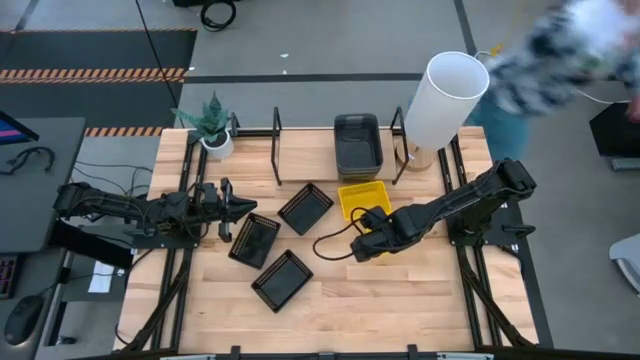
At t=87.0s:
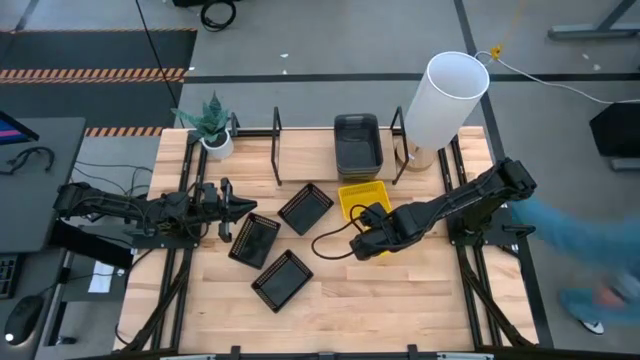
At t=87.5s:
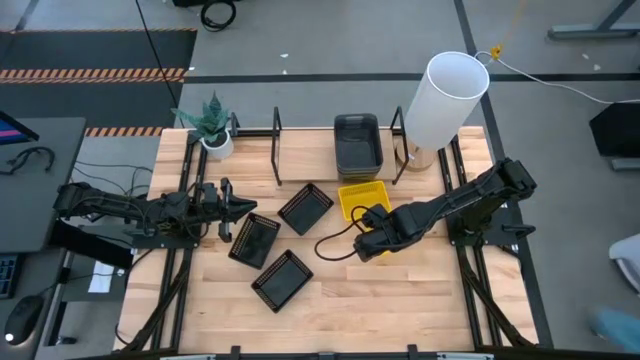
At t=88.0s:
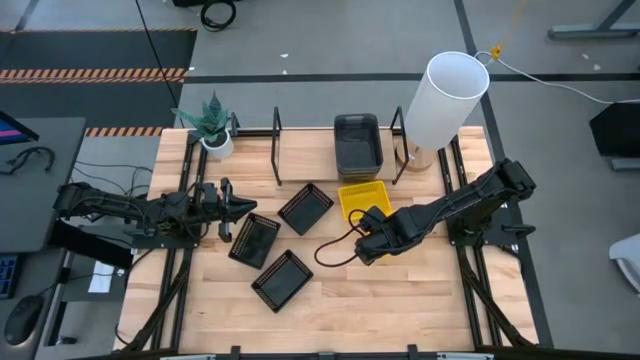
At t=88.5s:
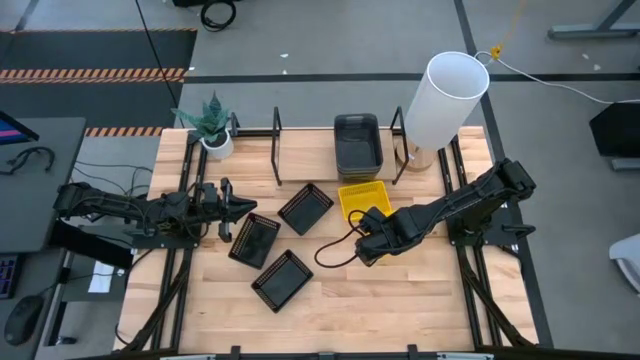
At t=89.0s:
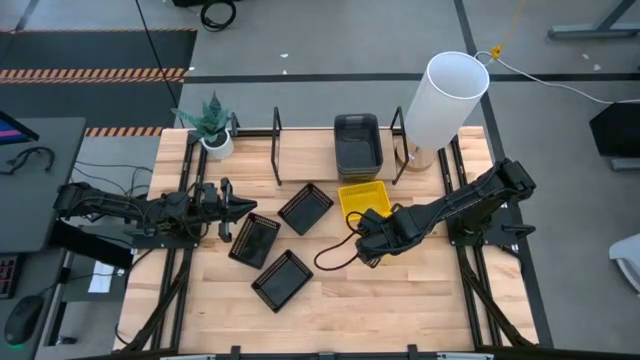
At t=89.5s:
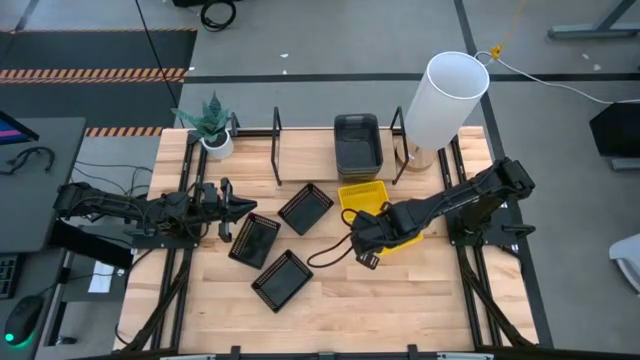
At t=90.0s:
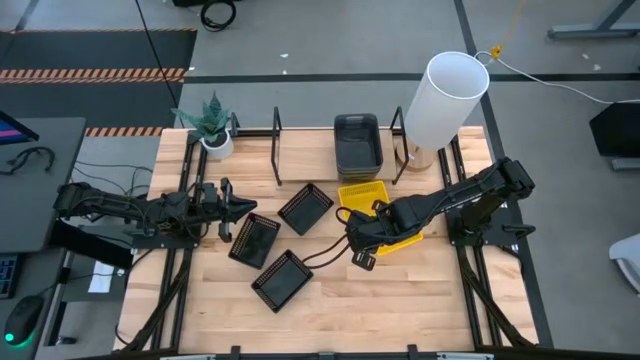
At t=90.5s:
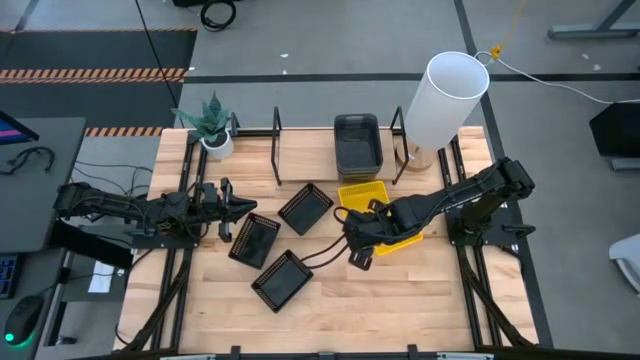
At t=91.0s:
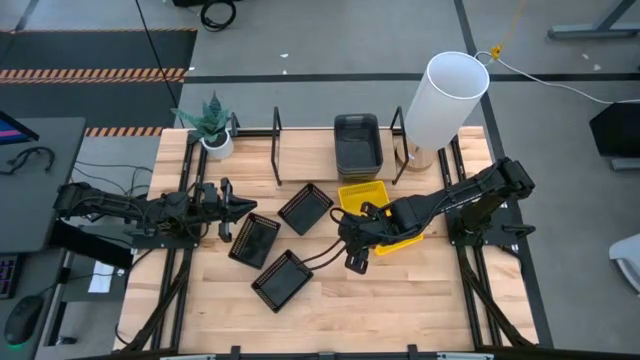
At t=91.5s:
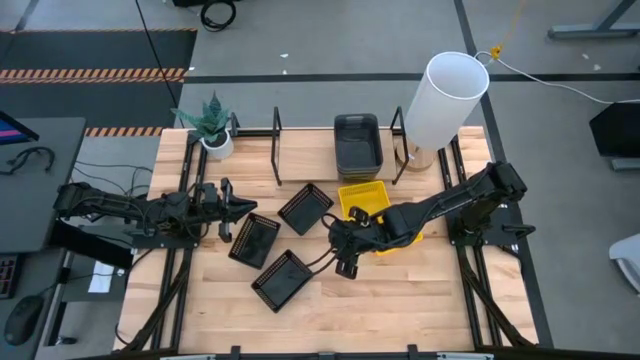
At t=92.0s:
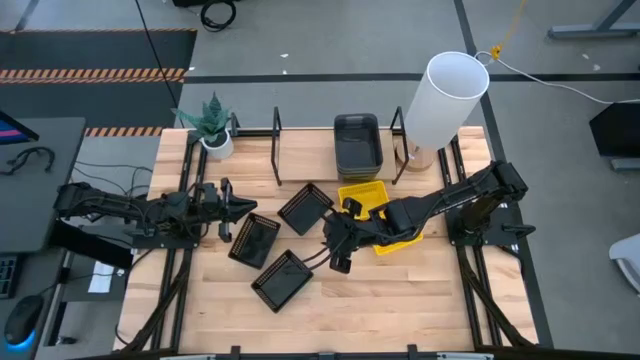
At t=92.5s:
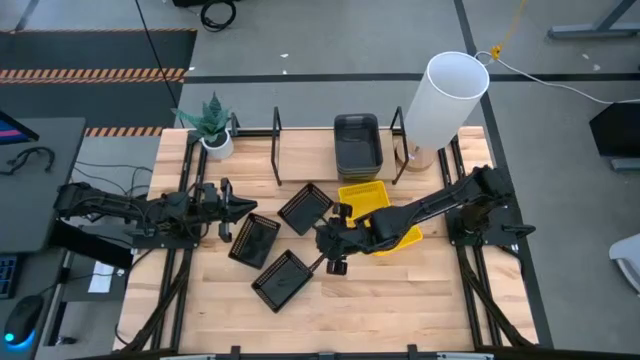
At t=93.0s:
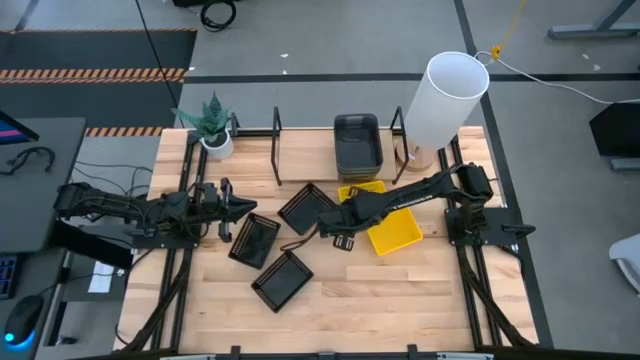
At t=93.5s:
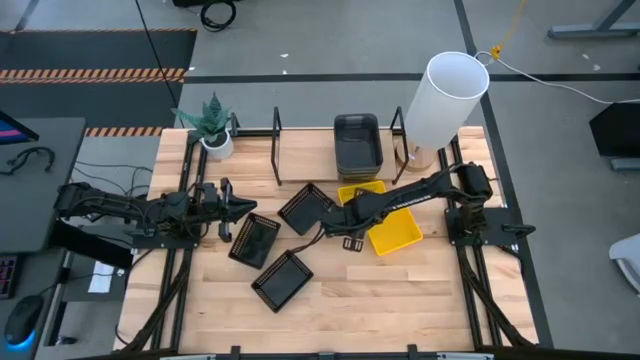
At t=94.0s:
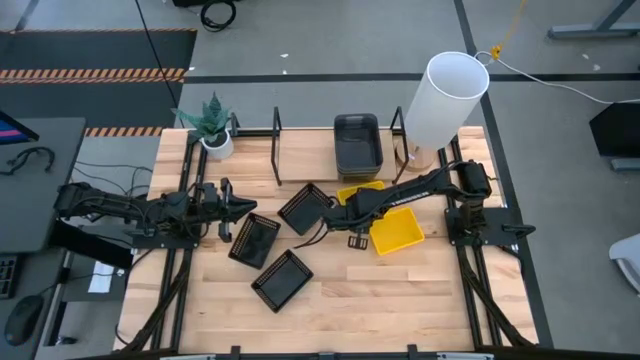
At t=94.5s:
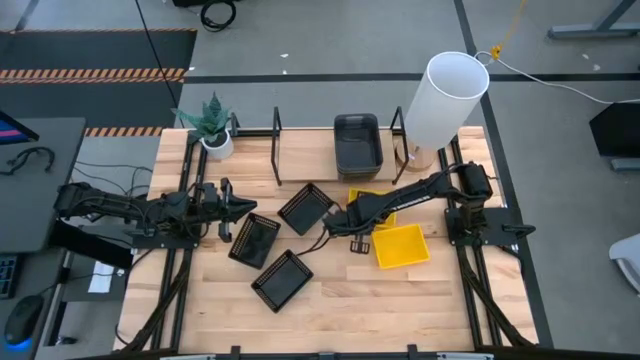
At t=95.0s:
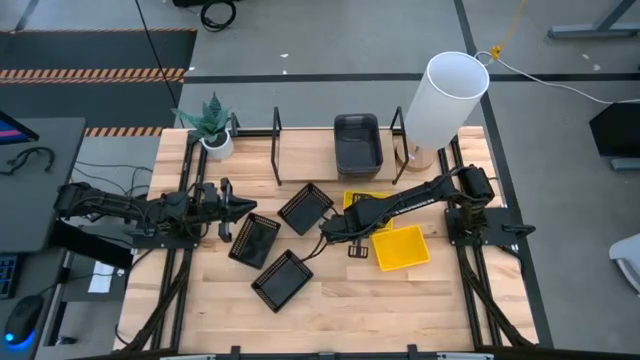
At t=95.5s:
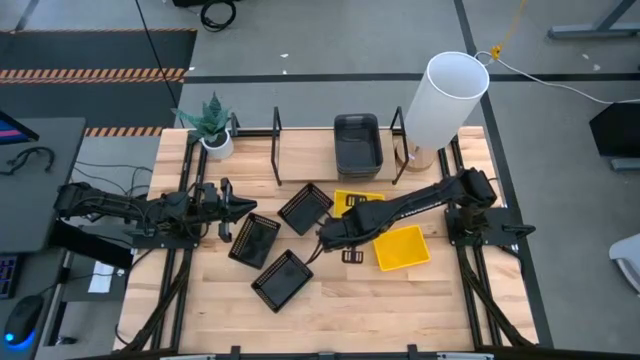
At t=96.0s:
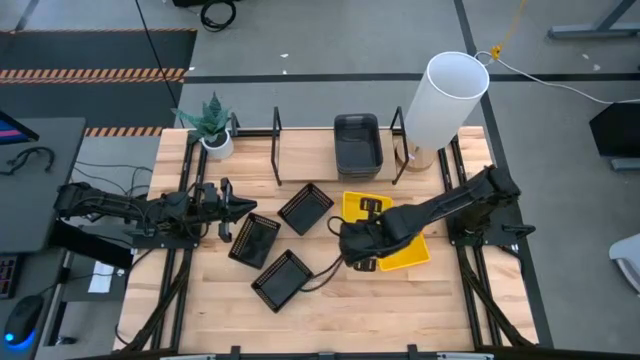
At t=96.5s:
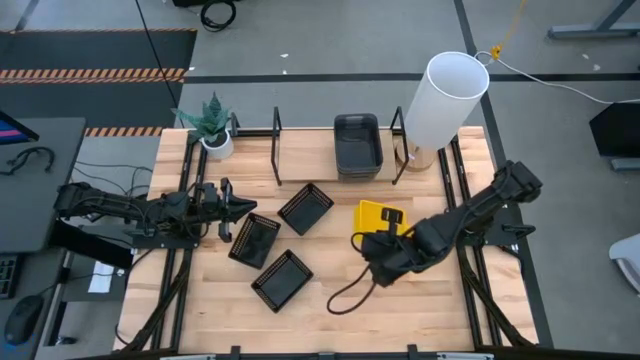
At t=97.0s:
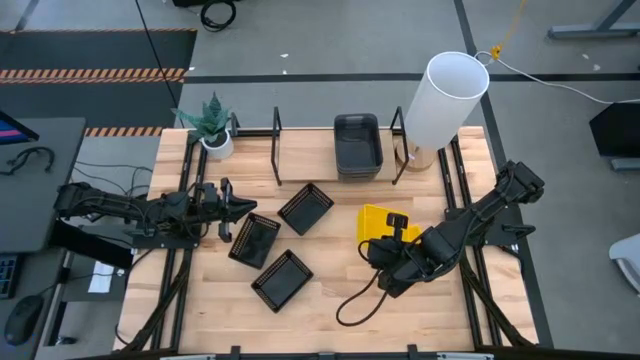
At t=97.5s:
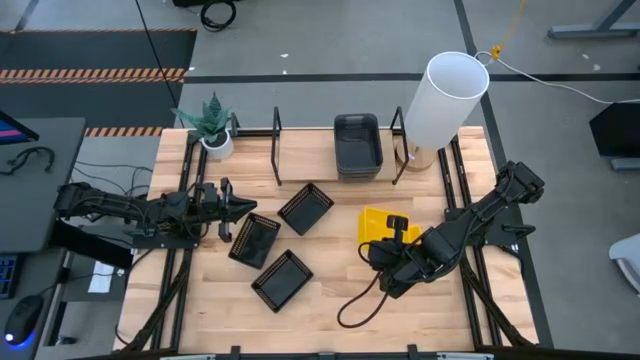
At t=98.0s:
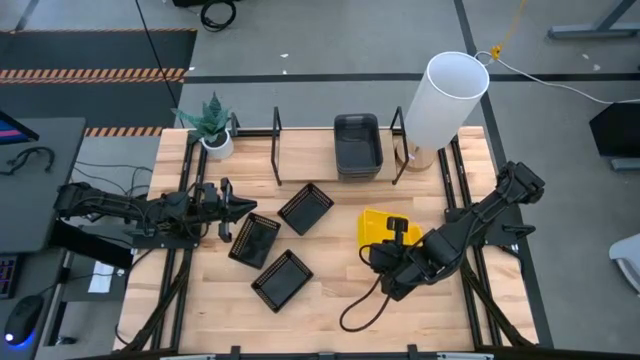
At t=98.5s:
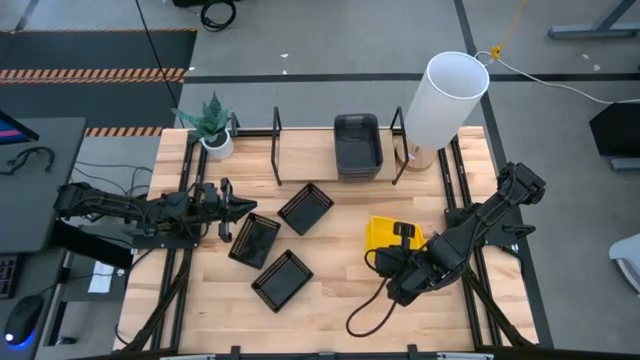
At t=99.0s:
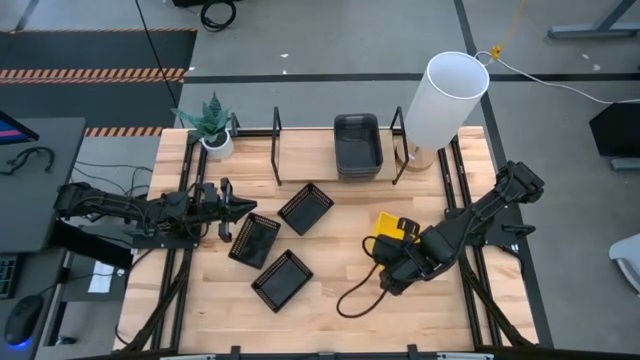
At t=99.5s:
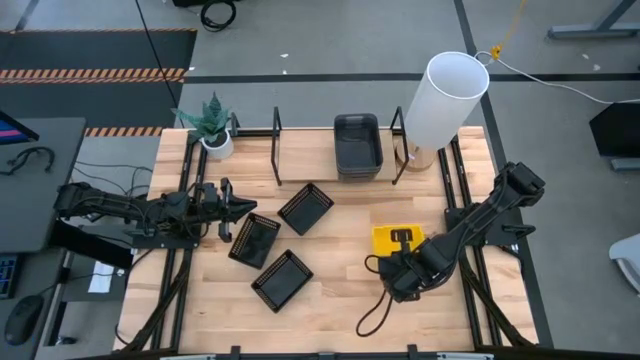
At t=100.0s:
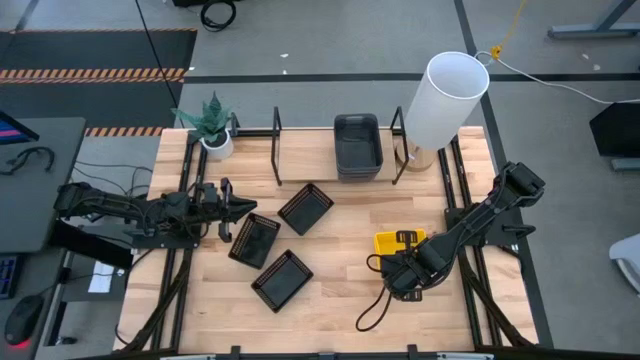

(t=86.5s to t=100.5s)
Task: Stack baskets on shelf by color
Stack the top yellow bin on the bottom yellow bins

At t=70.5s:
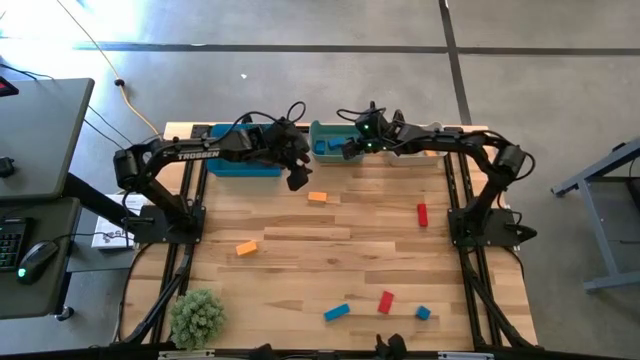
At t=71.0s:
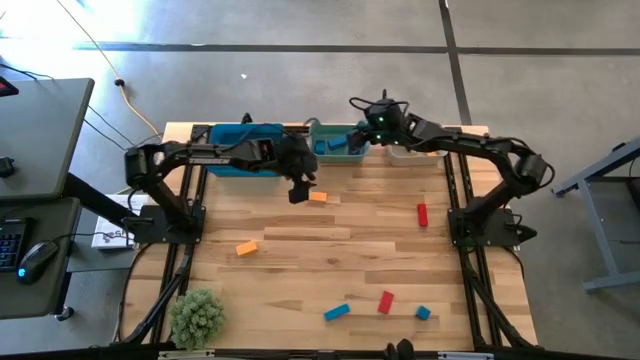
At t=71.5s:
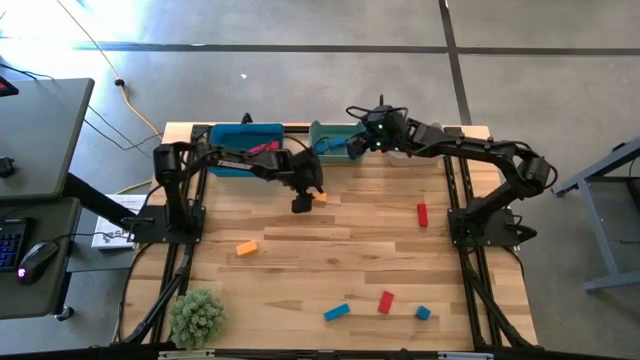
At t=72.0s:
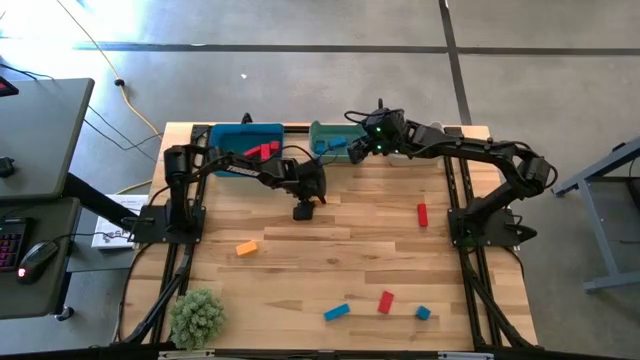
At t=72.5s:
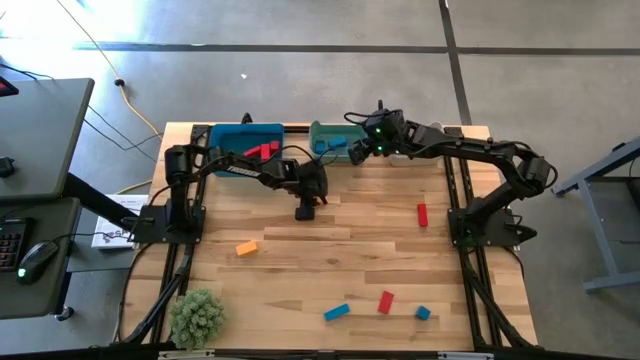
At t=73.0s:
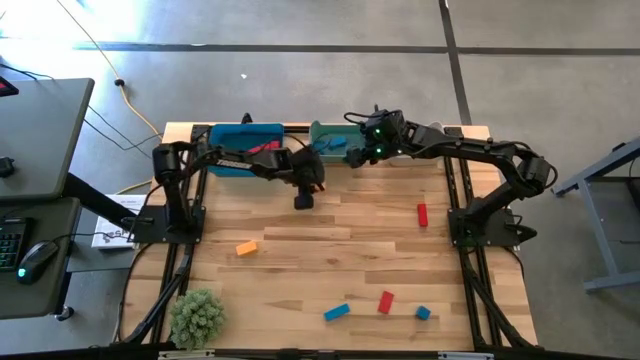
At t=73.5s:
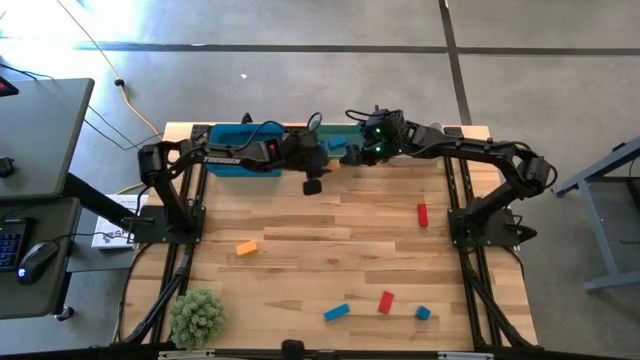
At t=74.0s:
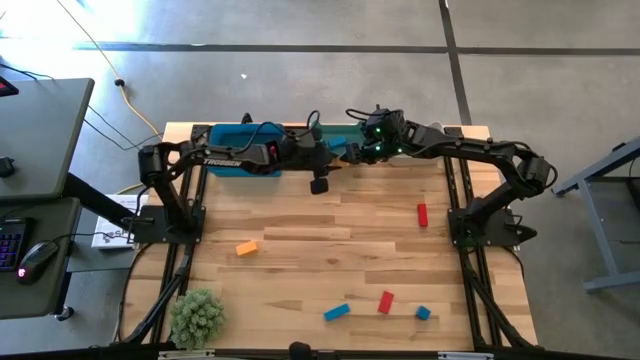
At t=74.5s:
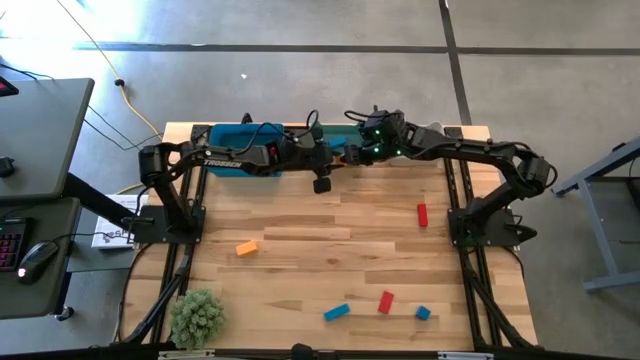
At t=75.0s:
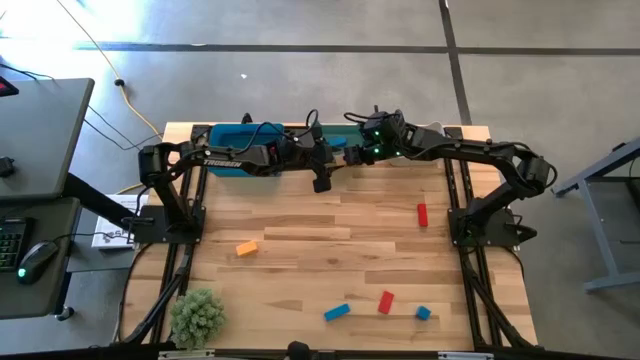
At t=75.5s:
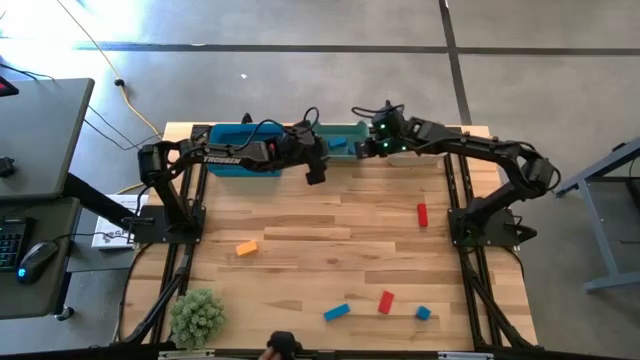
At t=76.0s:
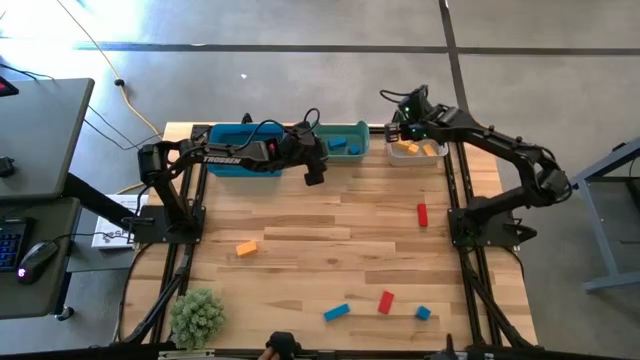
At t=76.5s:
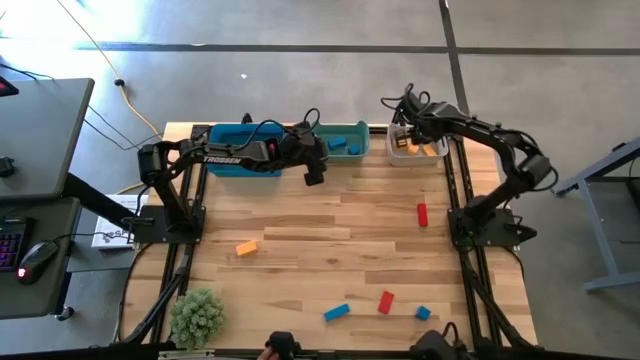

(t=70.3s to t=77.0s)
Task: Sort & place blocks by color
Put the yellow block into the gray bin
